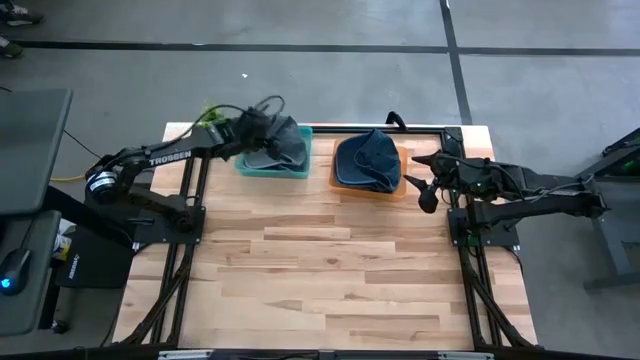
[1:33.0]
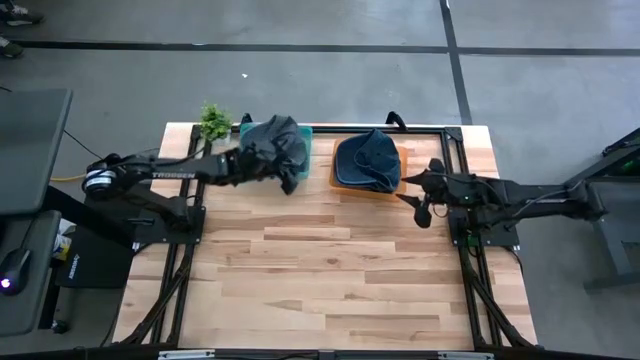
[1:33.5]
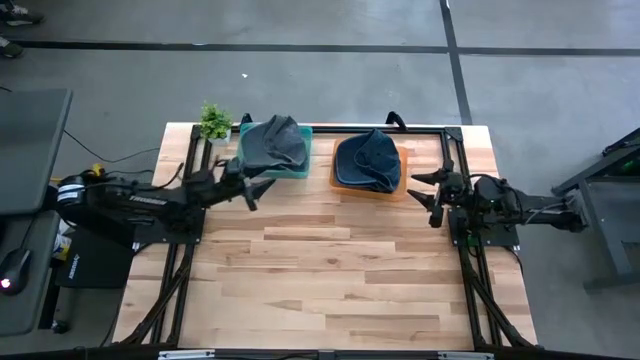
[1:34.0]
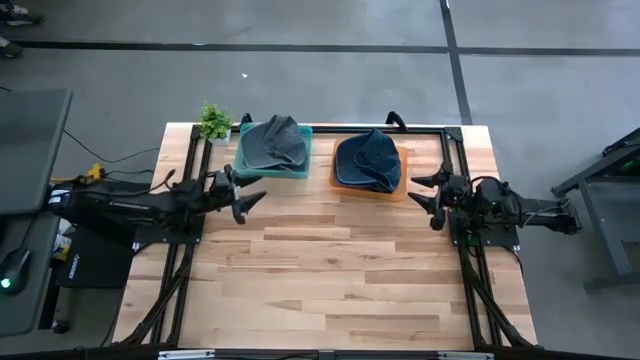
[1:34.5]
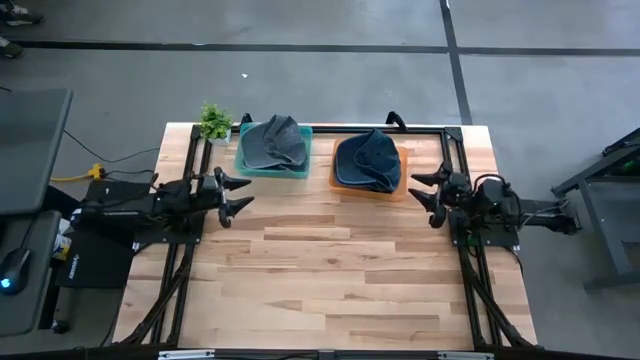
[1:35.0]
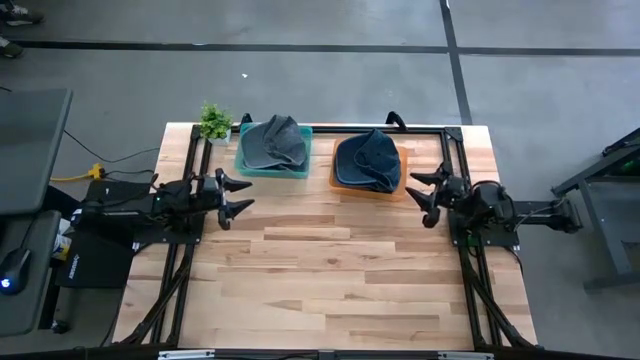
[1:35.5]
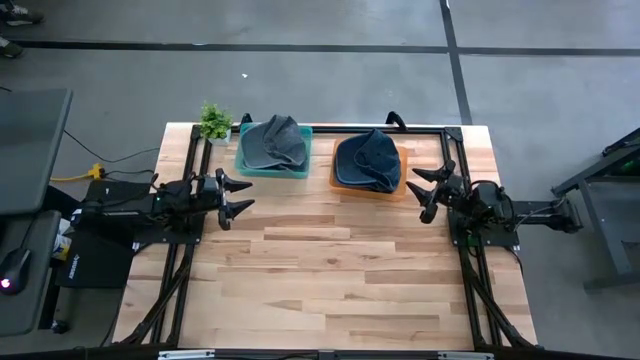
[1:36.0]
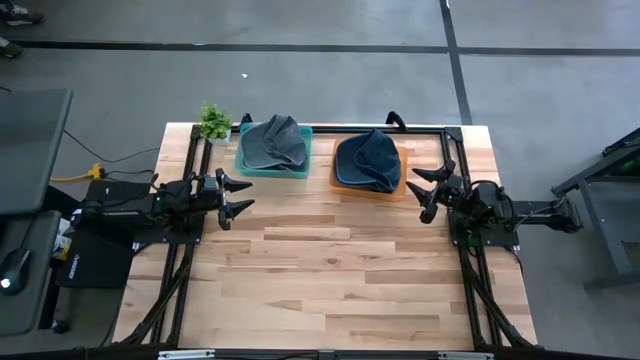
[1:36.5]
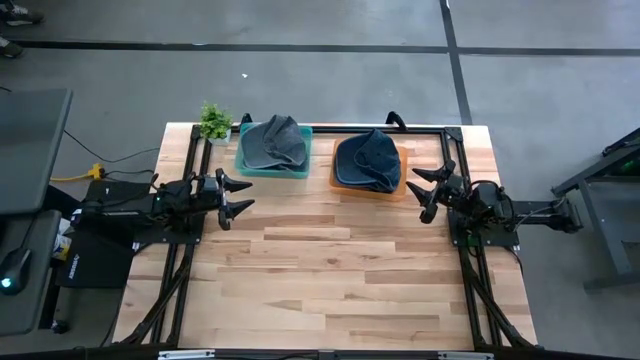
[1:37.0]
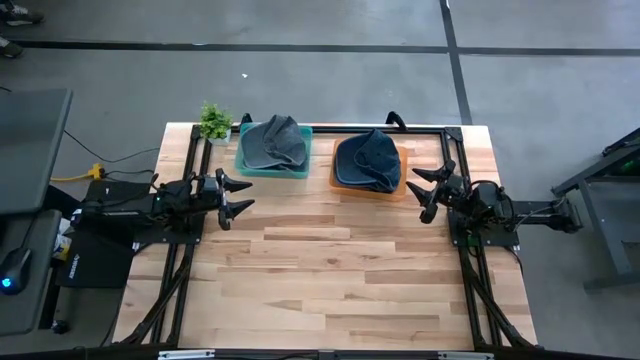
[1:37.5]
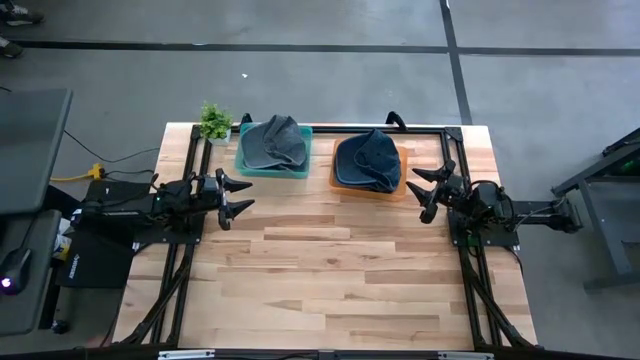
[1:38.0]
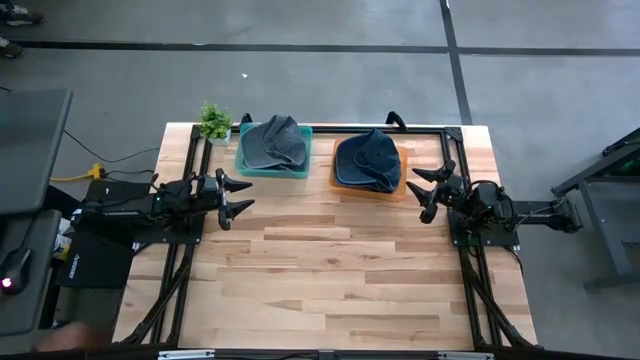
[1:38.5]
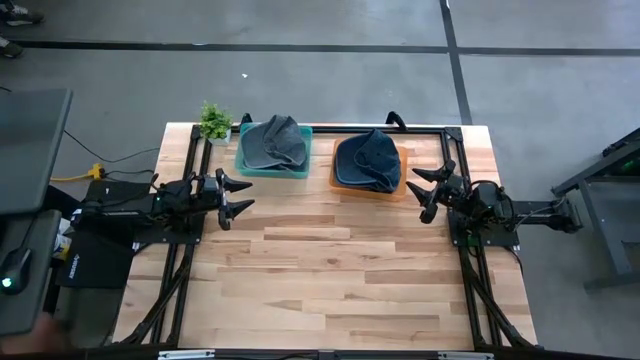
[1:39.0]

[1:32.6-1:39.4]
Task: Pick & Place hat
Return to Home Position

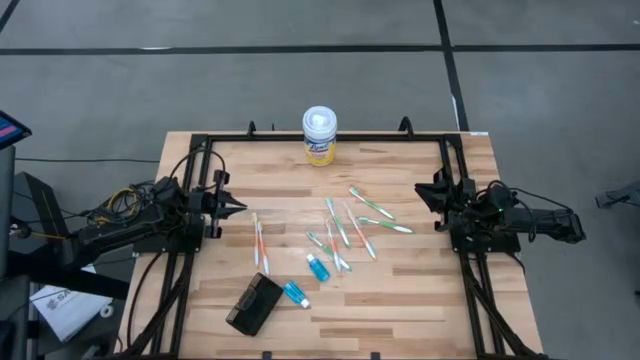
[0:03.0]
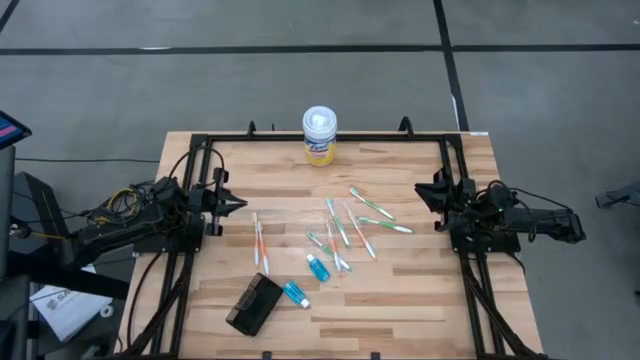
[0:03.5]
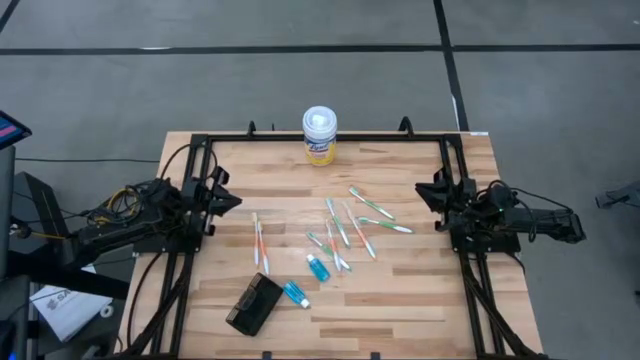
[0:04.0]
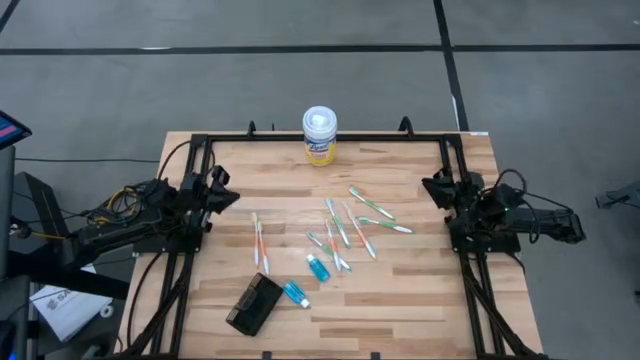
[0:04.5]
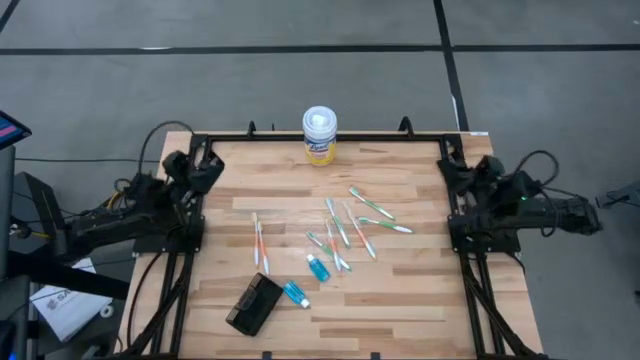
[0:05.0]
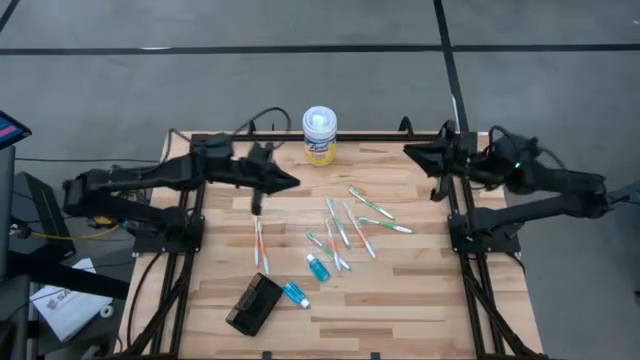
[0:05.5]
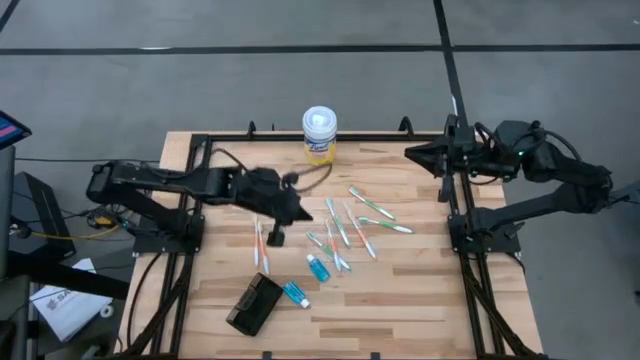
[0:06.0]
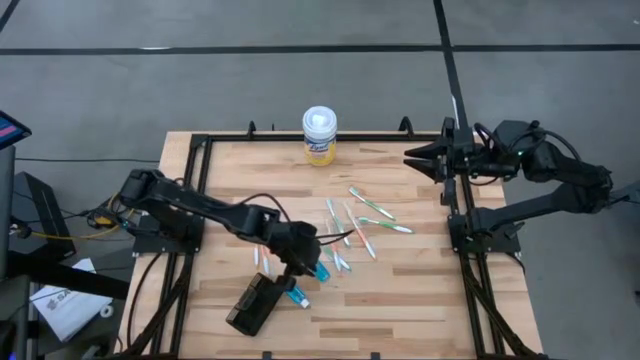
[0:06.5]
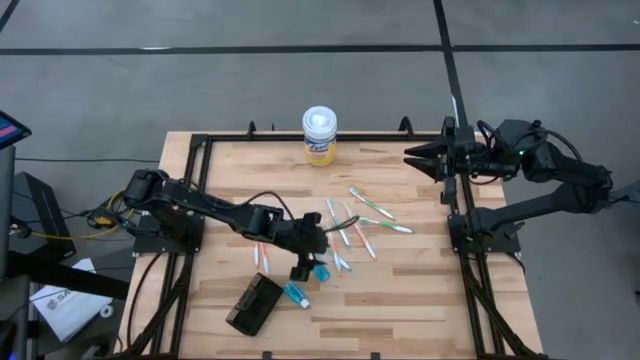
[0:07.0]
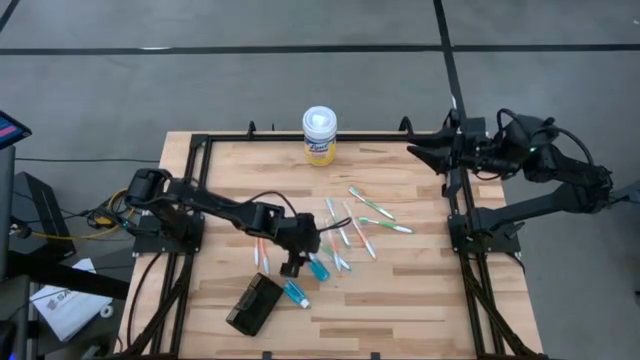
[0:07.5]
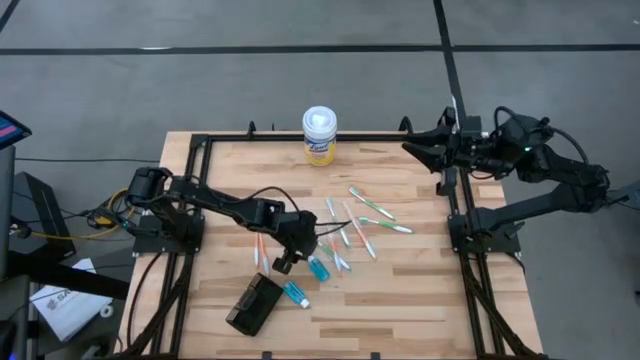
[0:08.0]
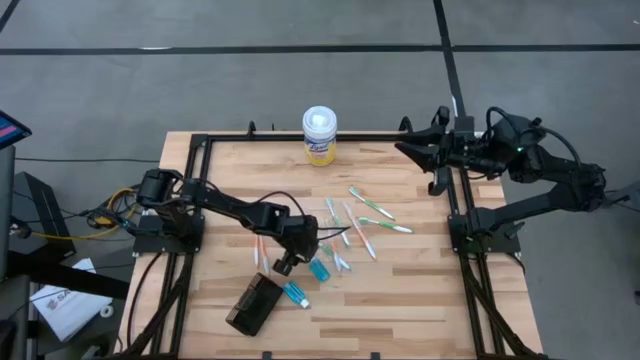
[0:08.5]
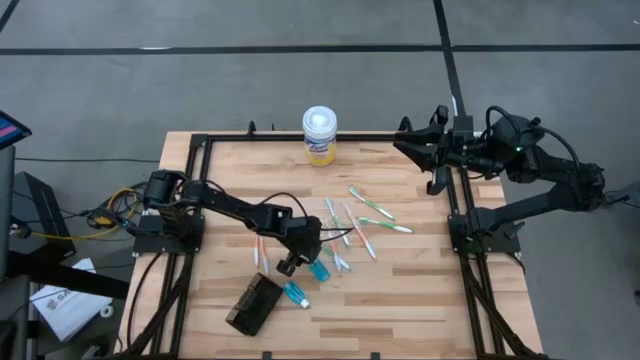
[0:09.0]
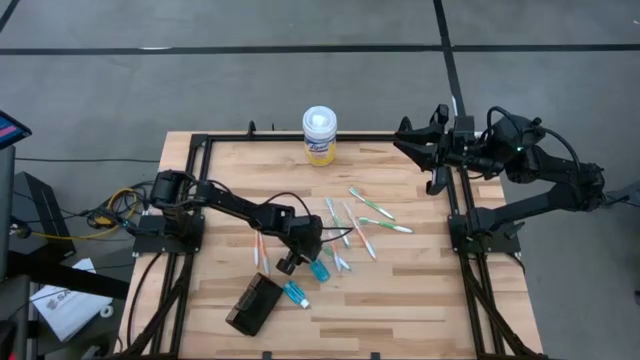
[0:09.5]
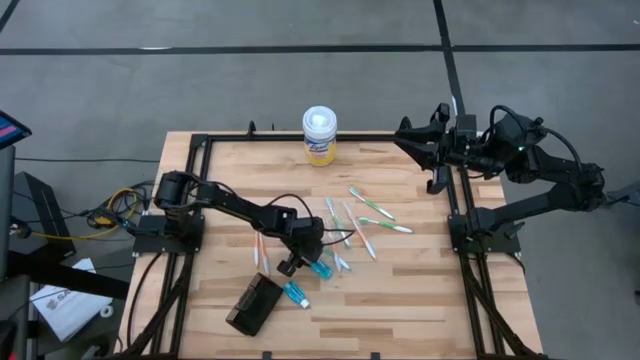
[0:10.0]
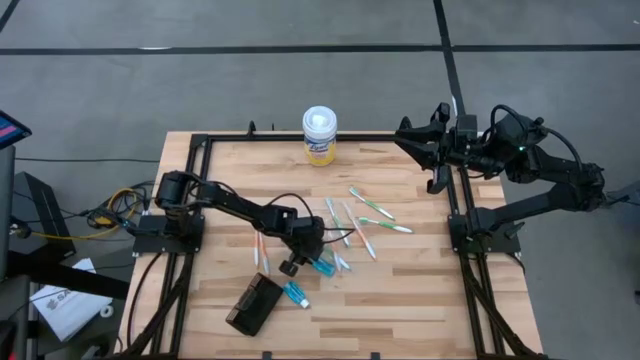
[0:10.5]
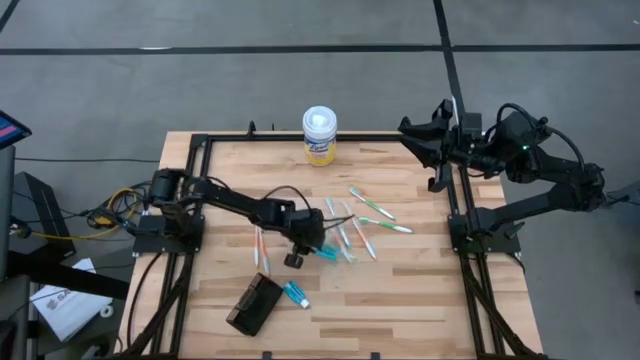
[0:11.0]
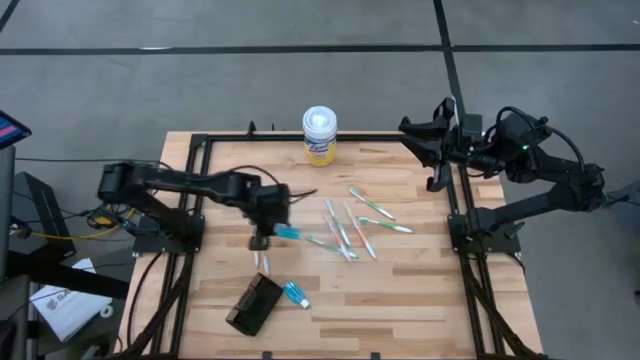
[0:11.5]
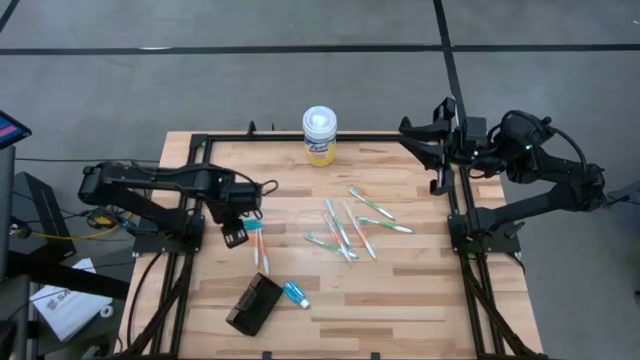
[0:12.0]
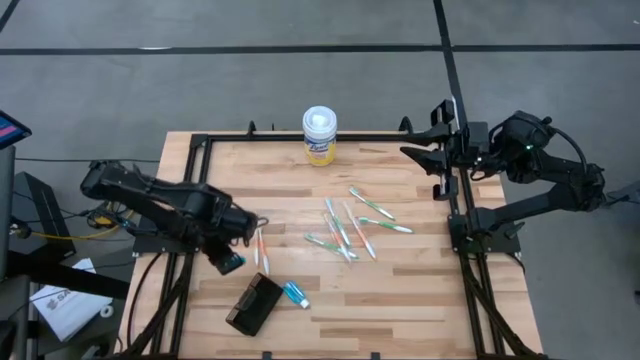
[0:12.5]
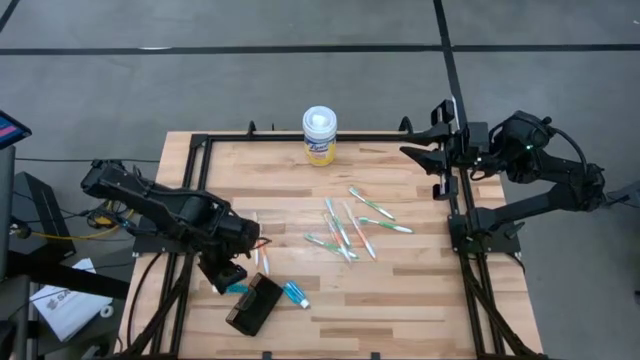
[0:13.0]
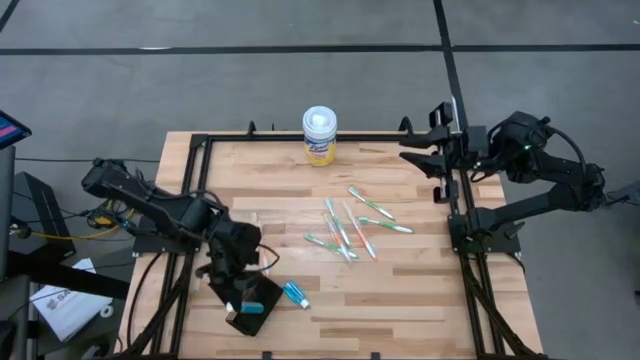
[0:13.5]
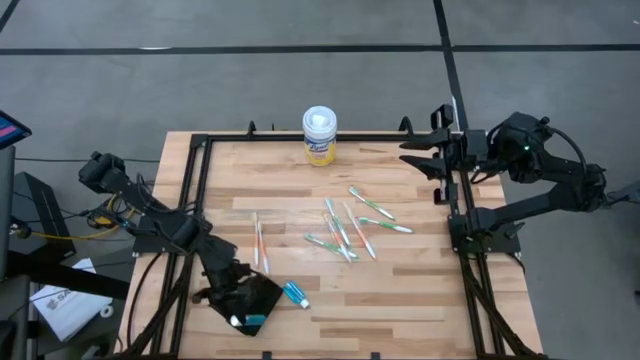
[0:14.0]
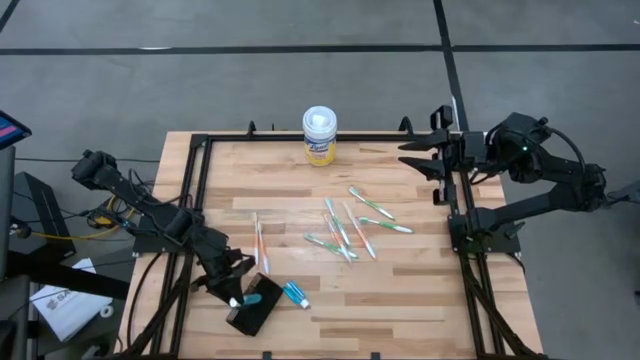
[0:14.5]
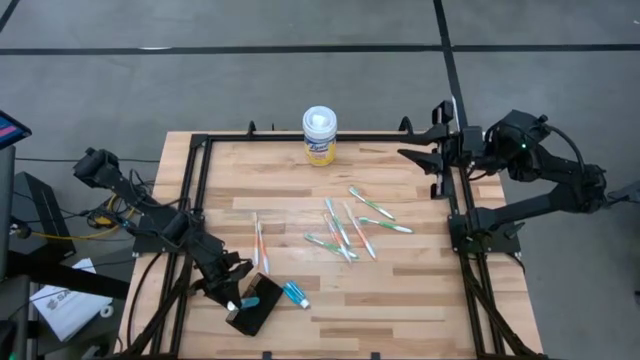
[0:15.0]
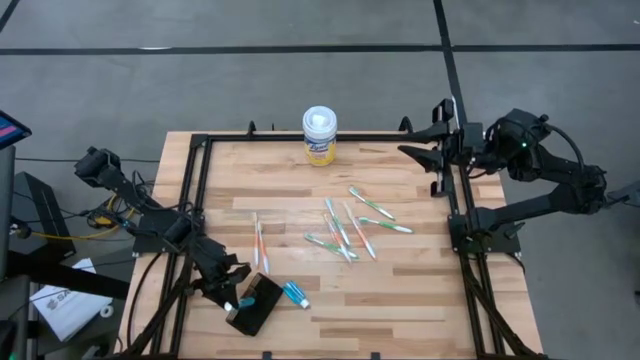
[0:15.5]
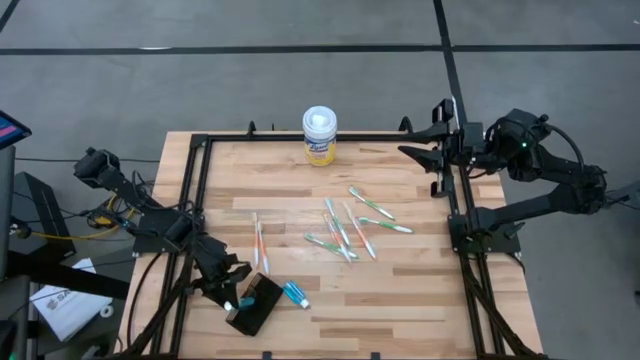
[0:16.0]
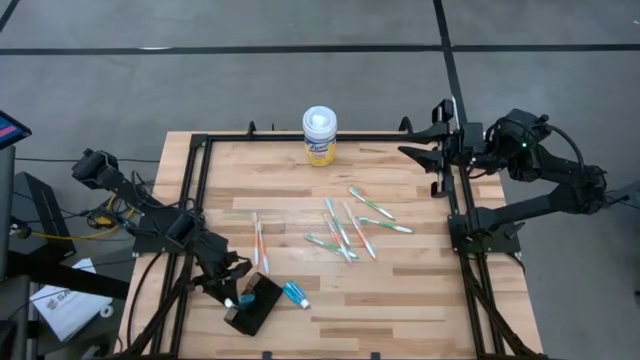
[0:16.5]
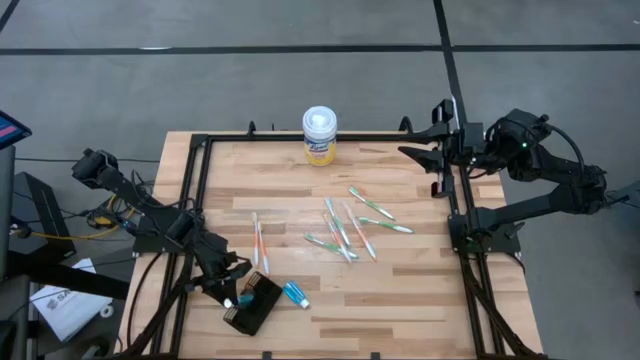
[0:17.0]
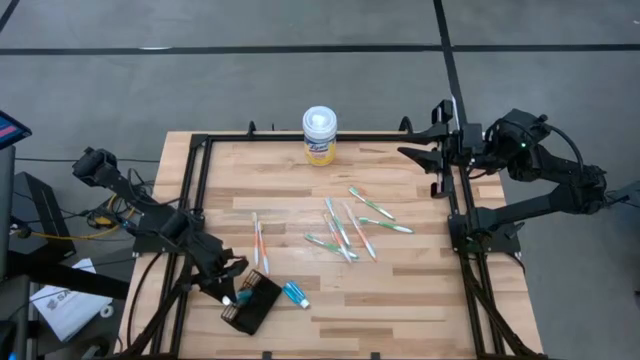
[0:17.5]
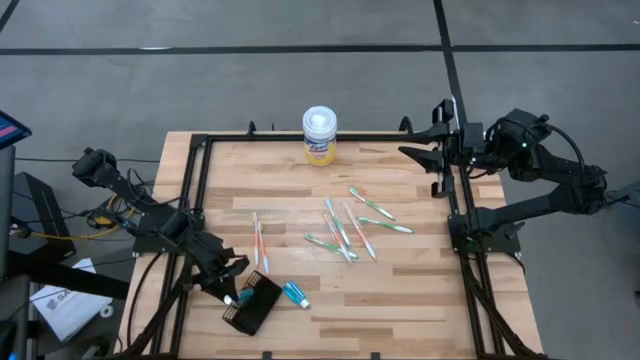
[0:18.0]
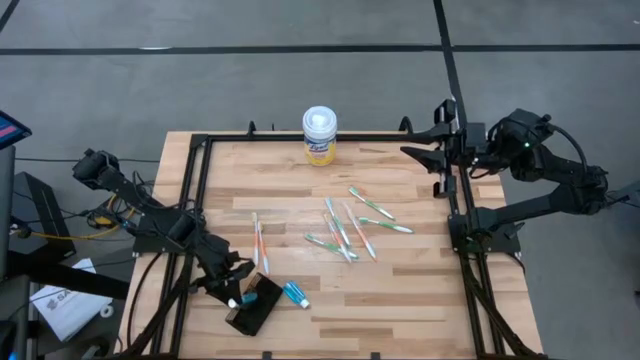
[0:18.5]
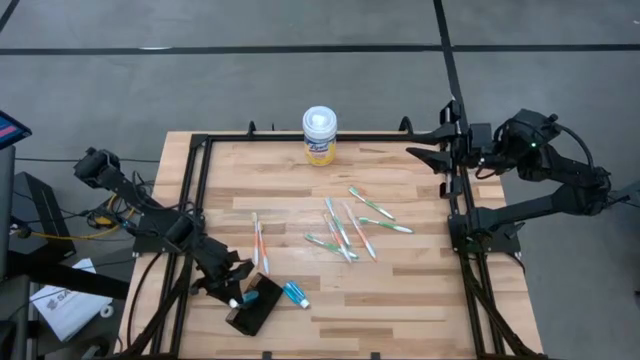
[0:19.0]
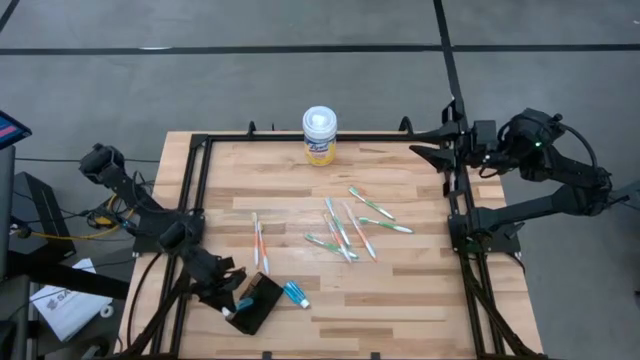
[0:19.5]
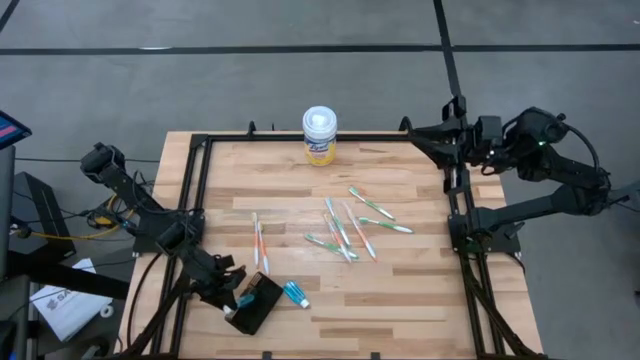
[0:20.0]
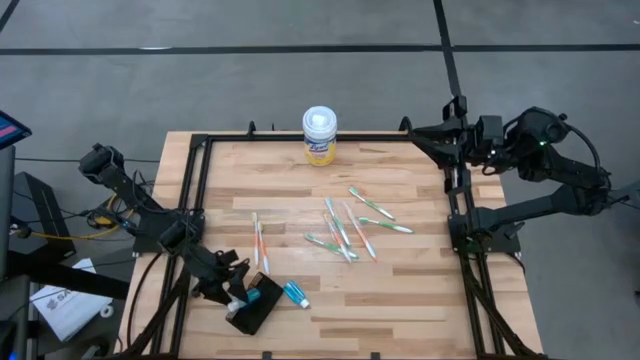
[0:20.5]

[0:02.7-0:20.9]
Task: Pick & Place toothbrushing station
Put the blue mouthwash into the black wire organizer bin
